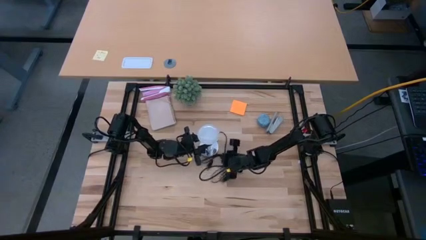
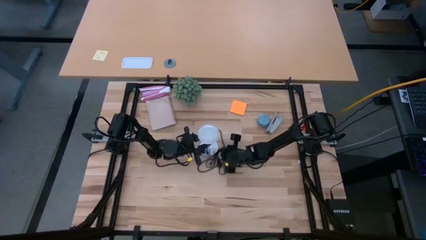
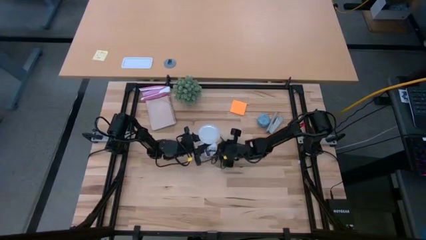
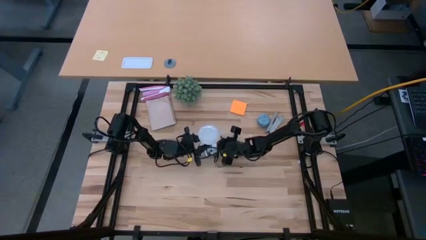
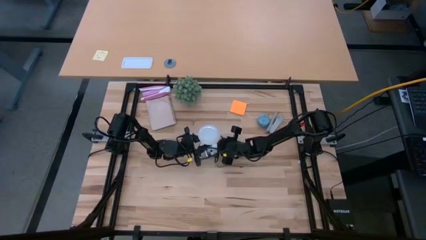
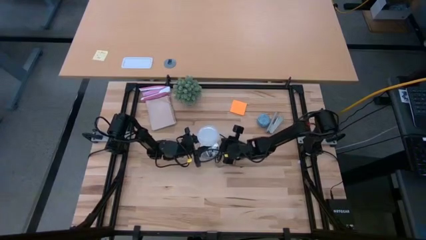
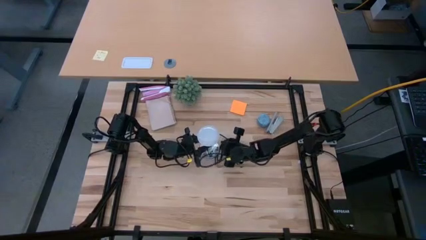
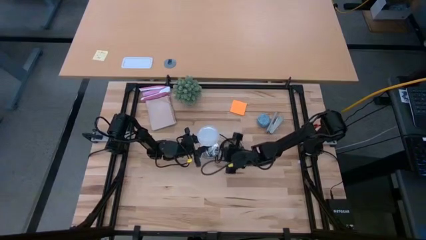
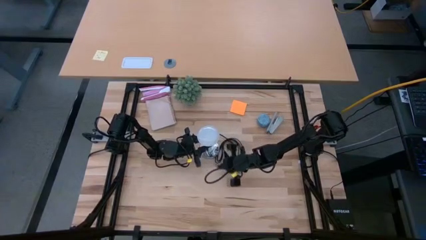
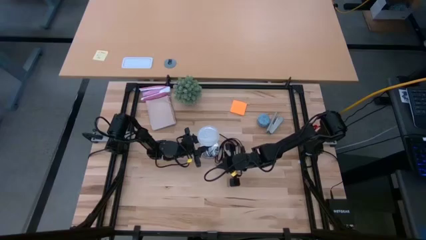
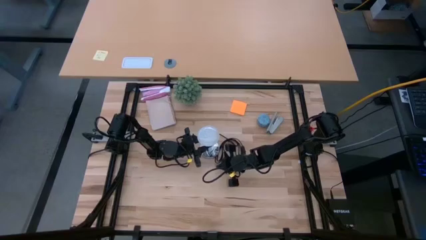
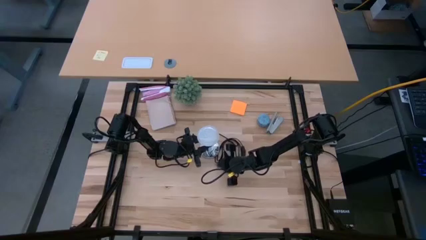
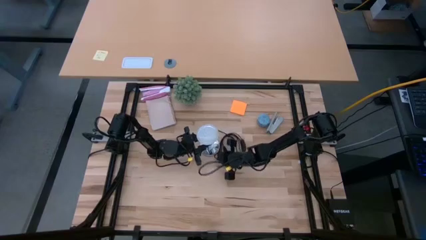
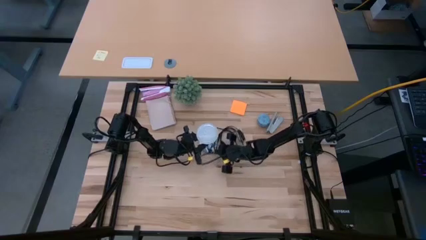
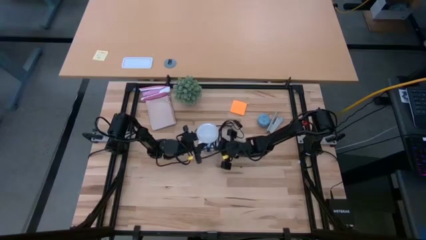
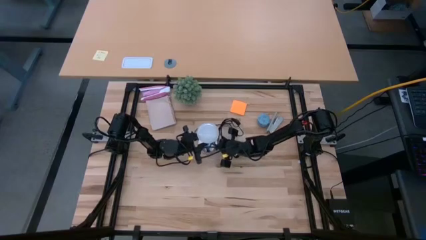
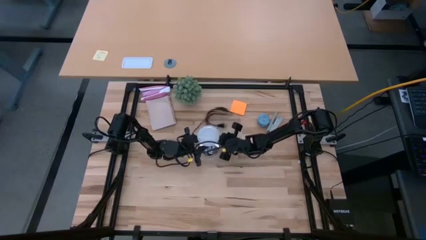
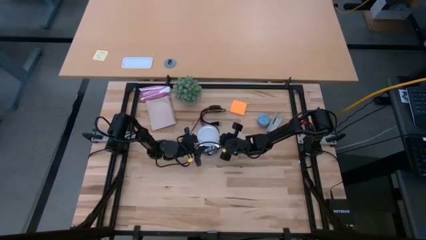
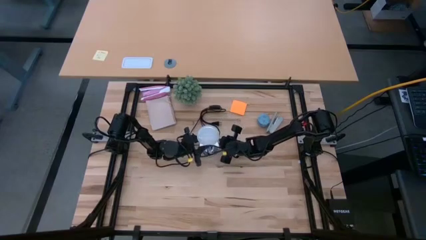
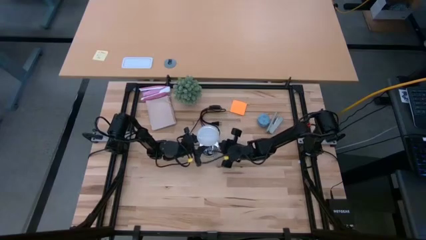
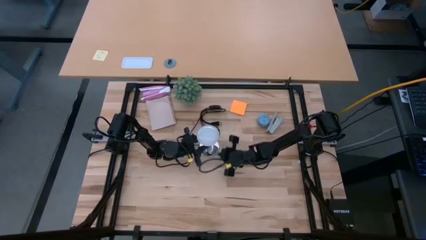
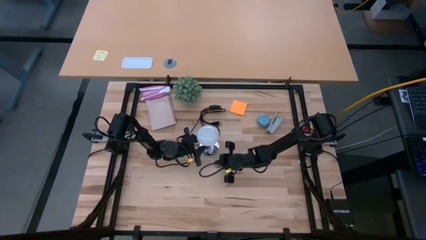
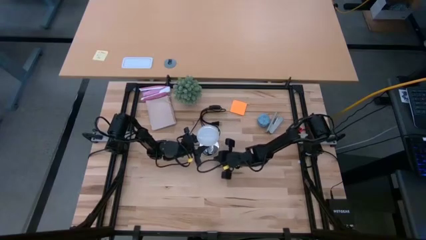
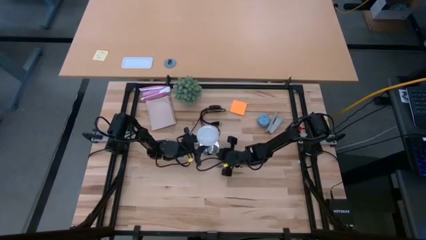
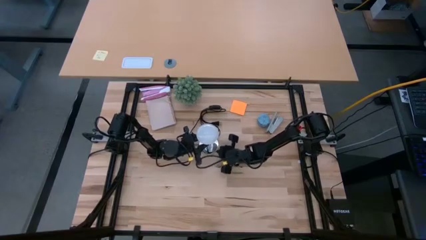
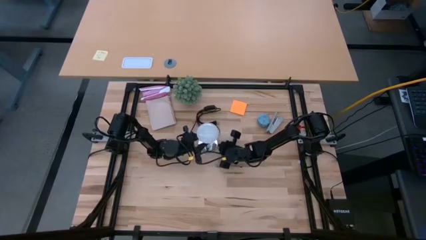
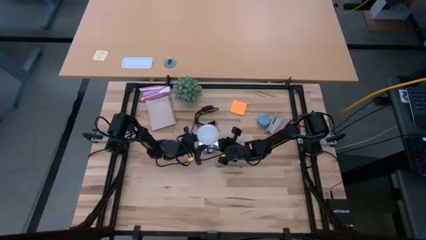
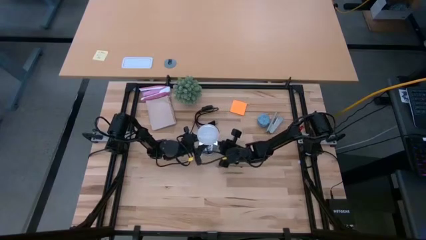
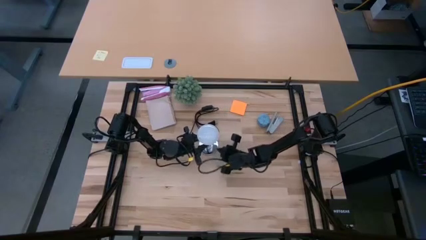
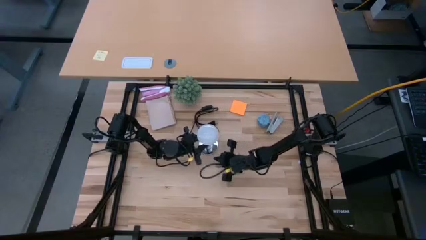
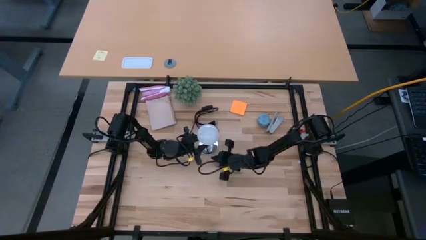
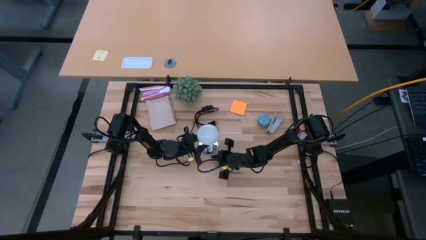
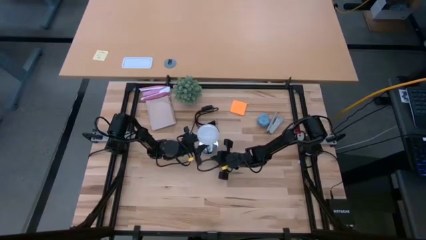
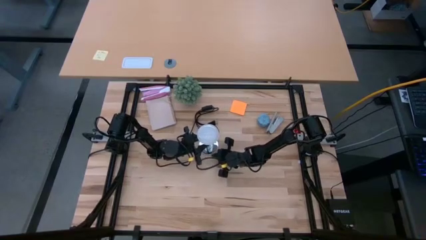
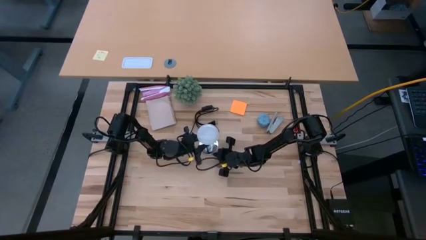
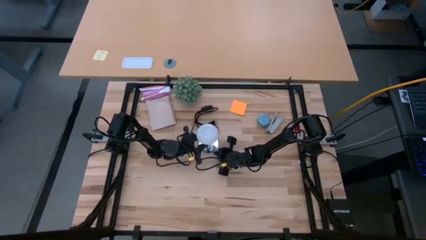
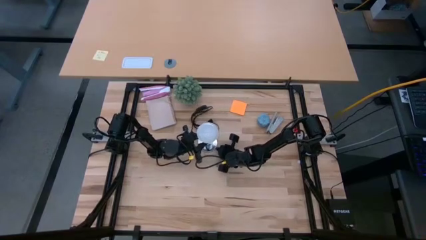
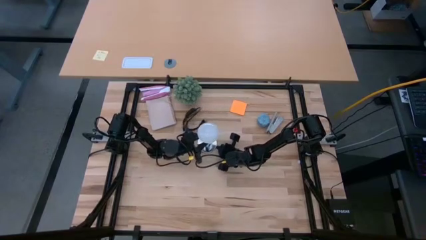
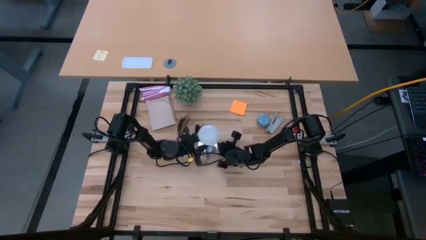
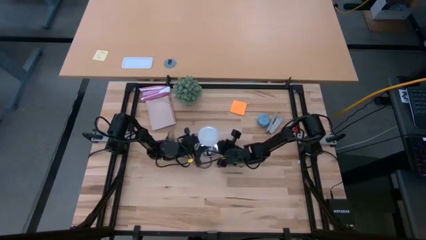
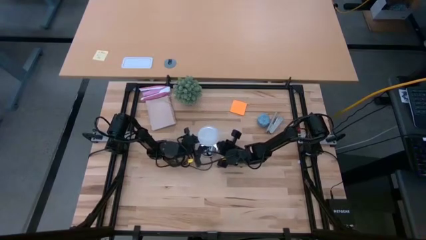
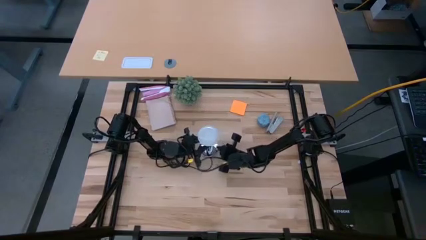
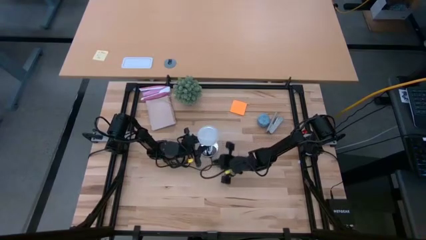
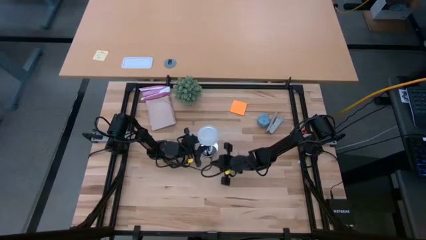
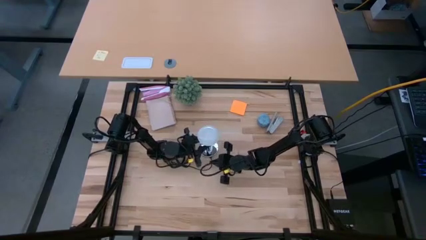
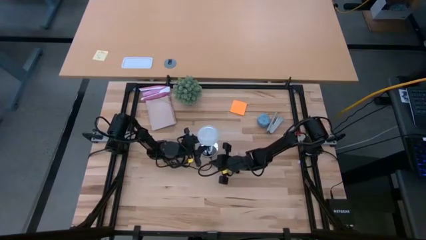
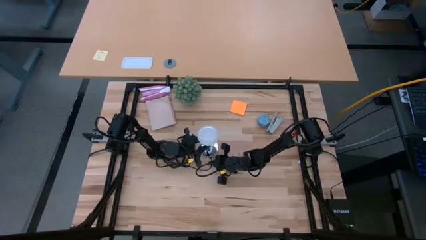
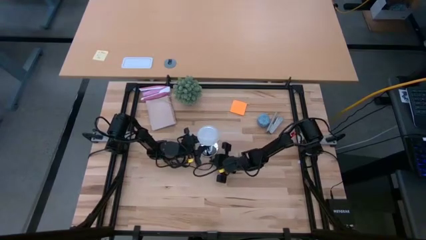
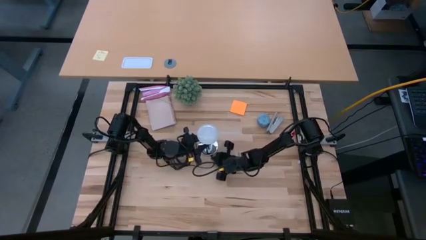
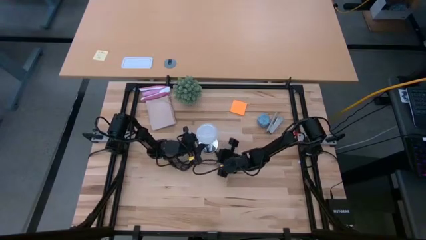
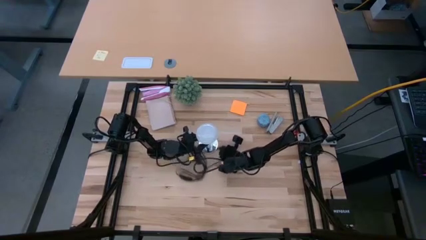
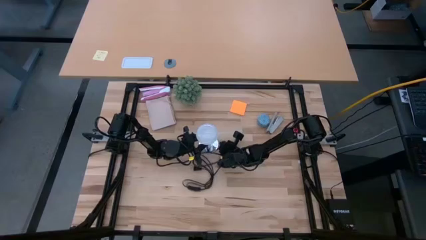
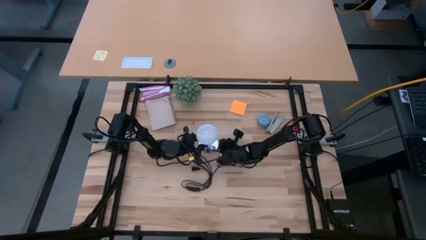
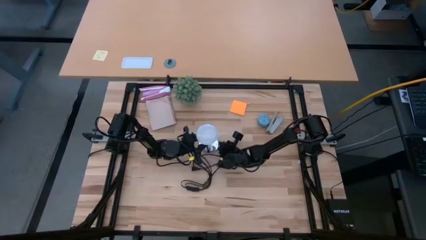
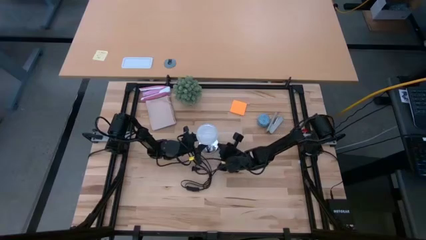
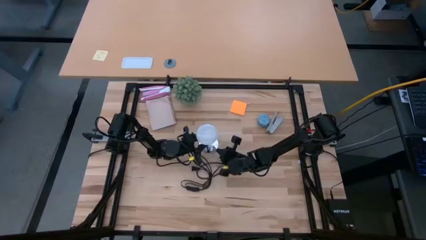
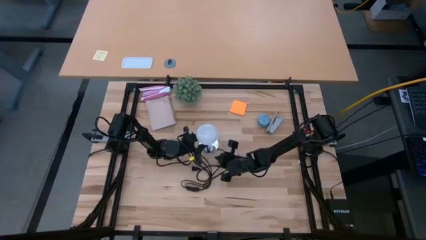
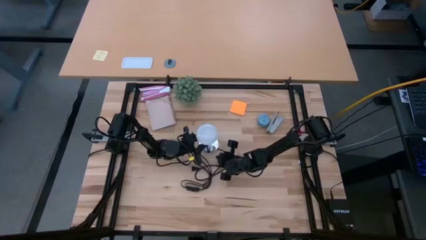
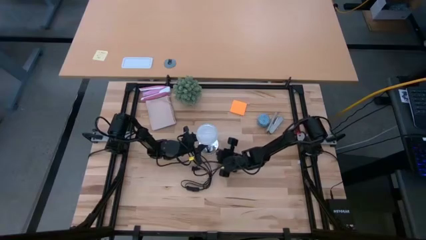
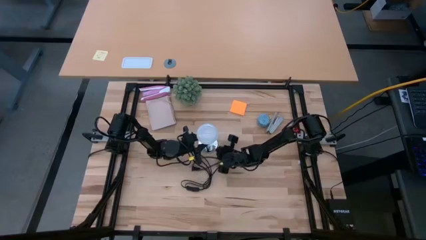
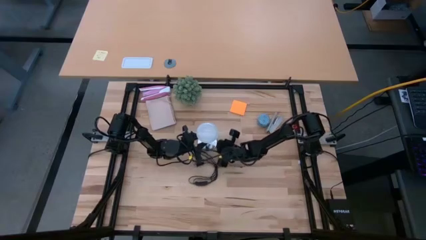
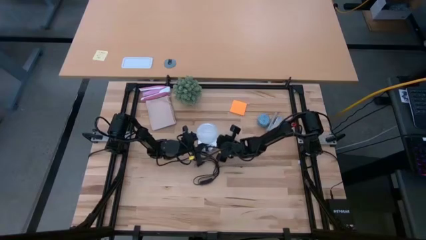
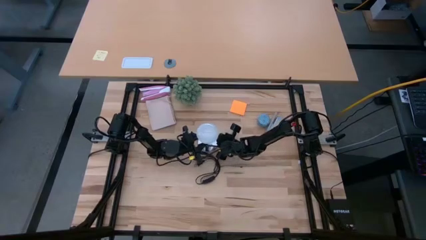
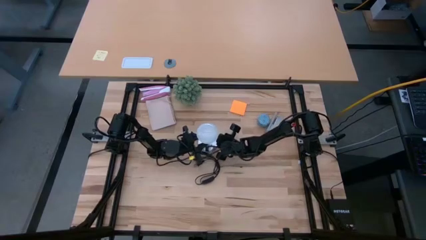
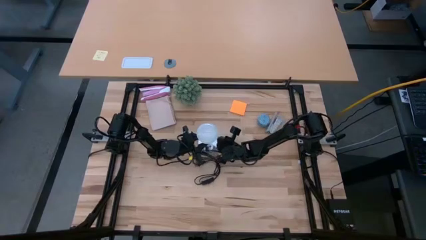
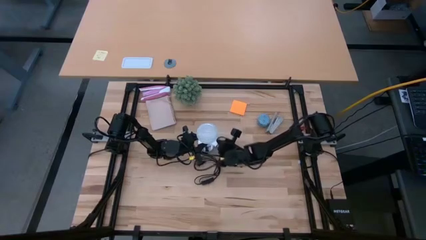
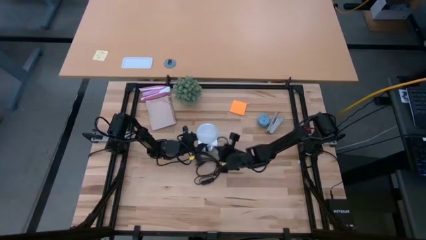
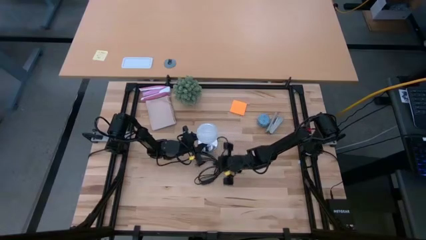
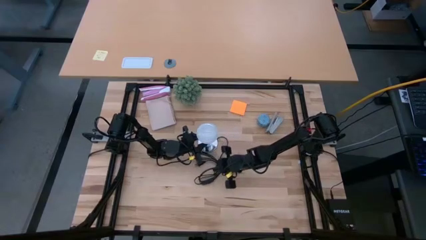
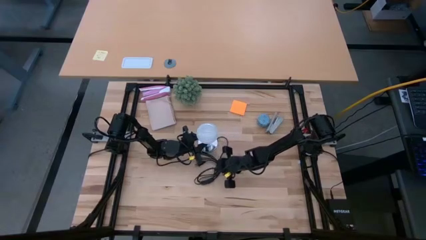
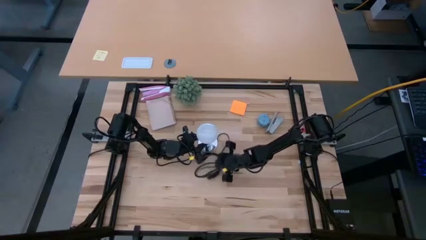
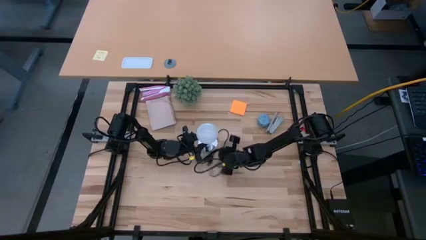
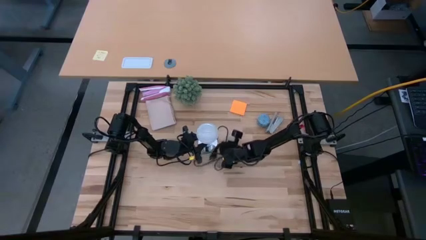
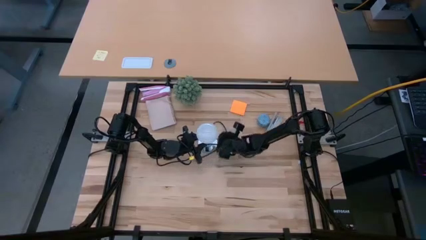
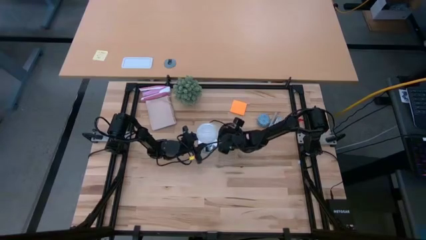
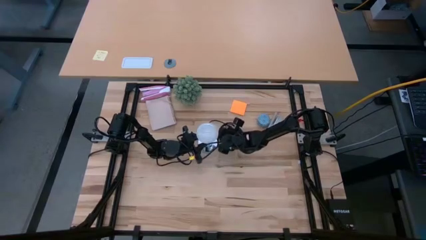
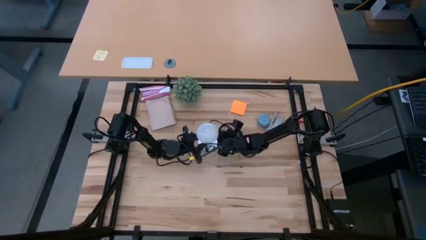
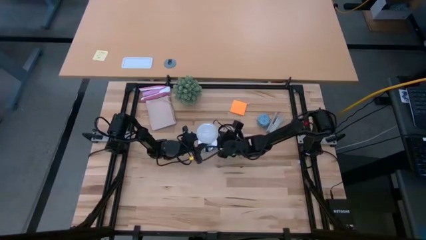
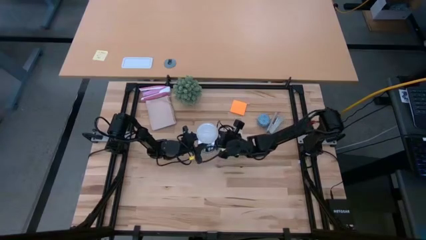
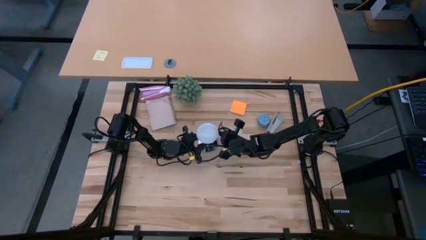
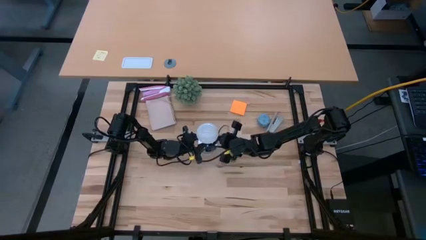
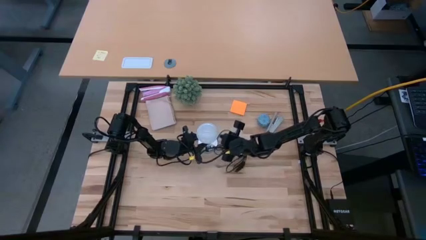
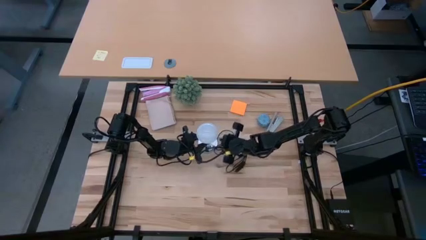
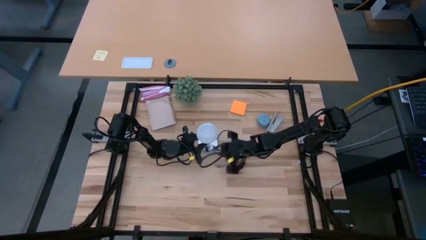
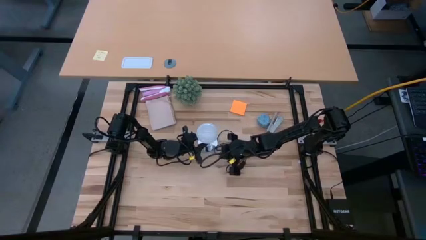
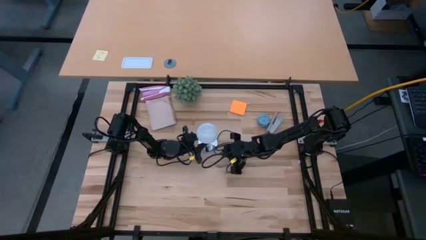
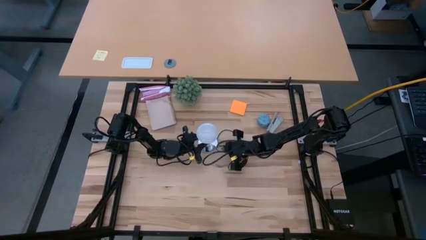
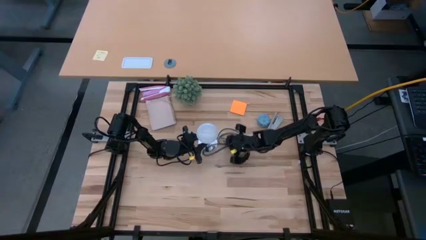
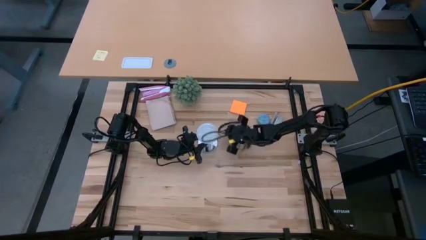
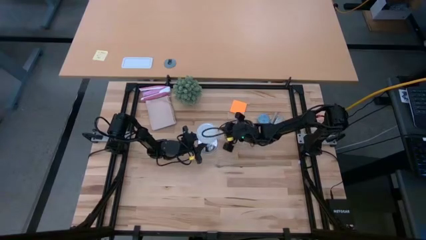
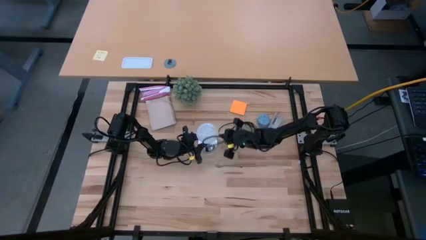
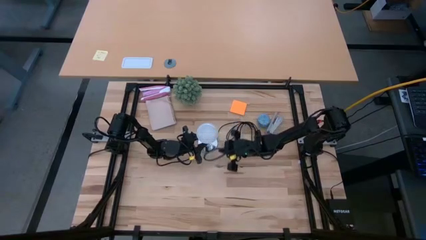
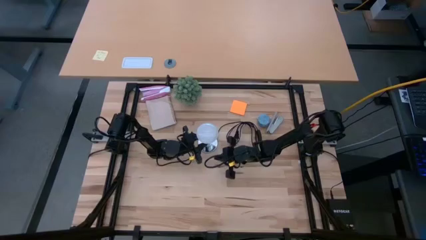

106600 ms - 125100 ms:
Task: Screw lightbulb
Insert the white lightbulb into the silver lamp
